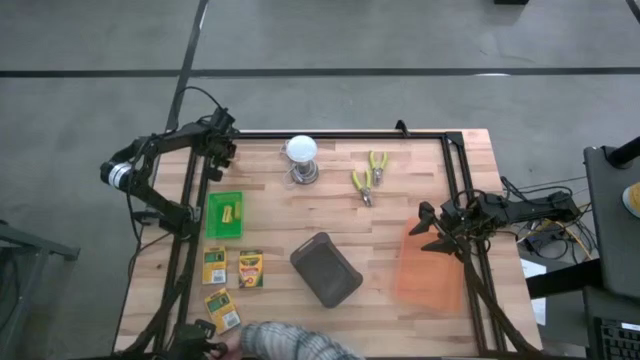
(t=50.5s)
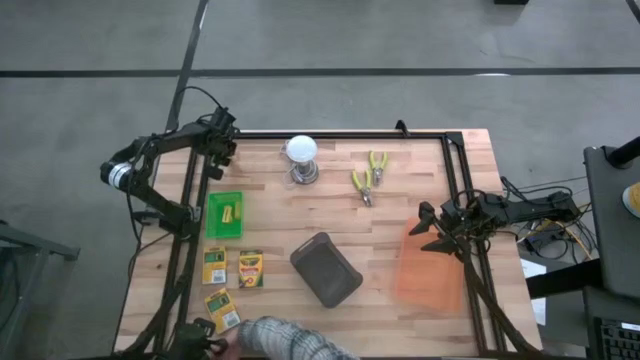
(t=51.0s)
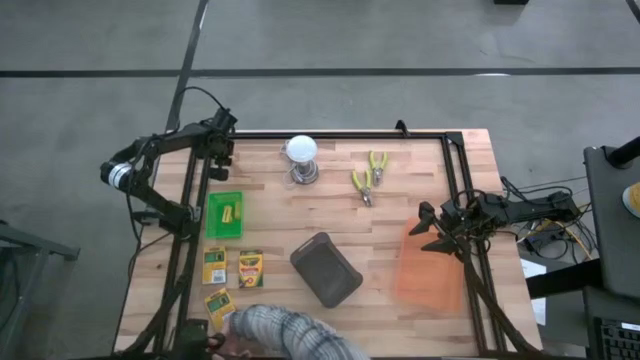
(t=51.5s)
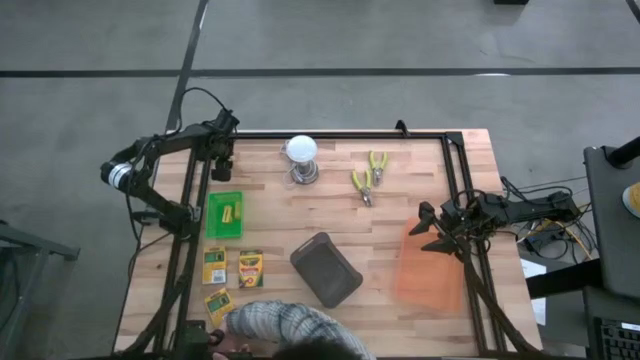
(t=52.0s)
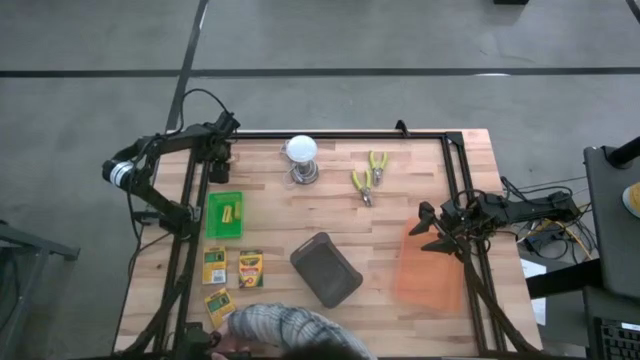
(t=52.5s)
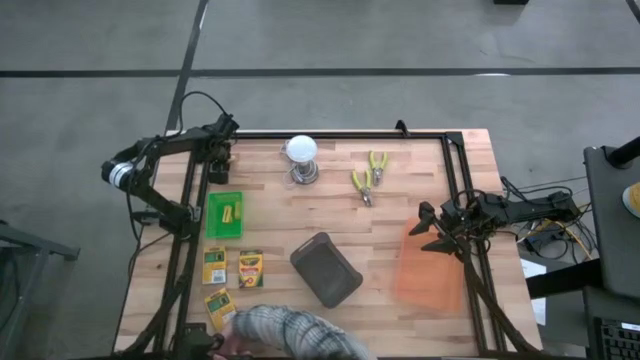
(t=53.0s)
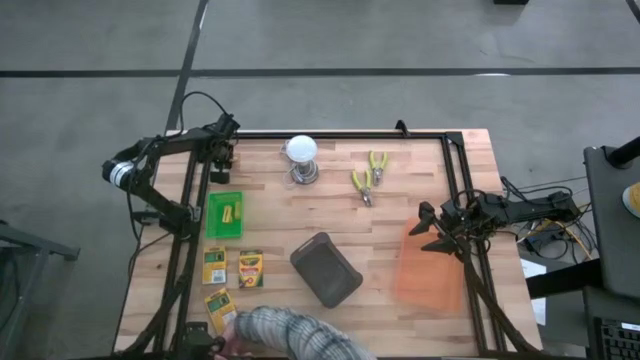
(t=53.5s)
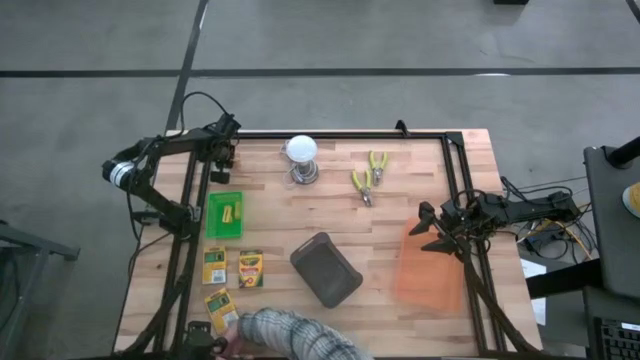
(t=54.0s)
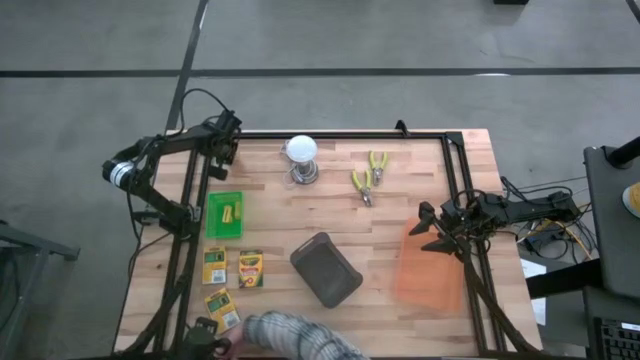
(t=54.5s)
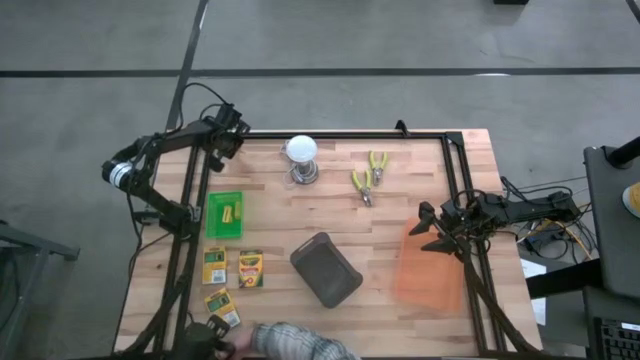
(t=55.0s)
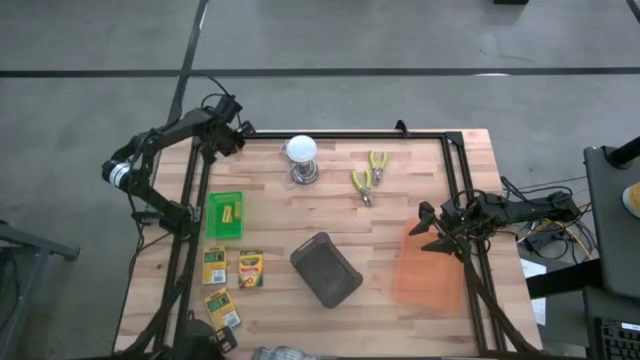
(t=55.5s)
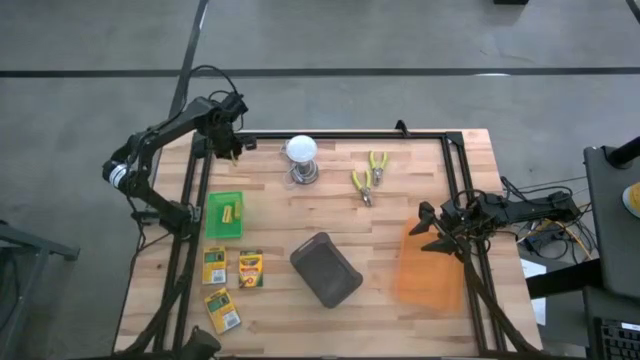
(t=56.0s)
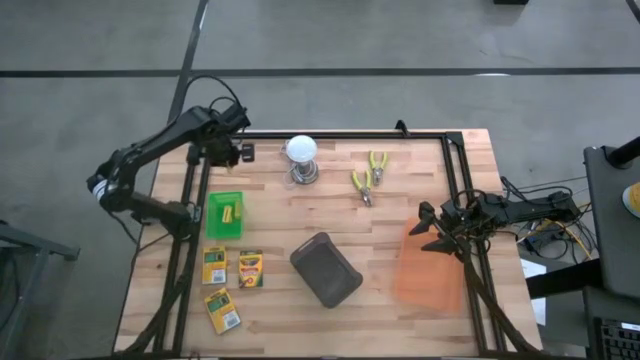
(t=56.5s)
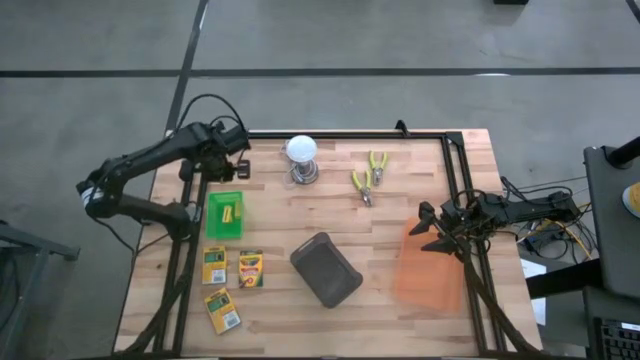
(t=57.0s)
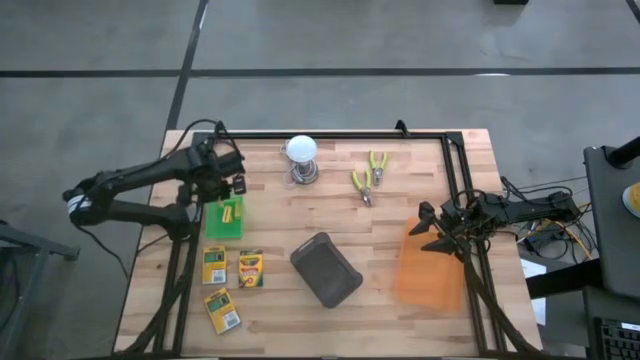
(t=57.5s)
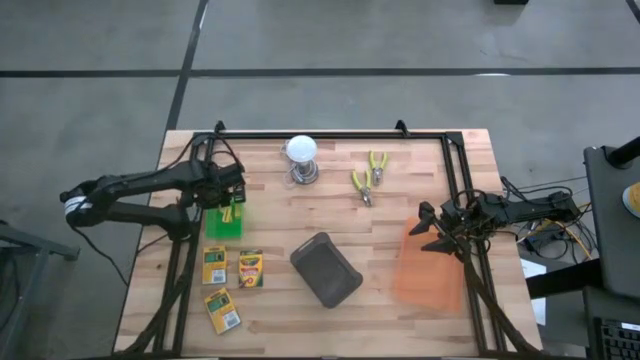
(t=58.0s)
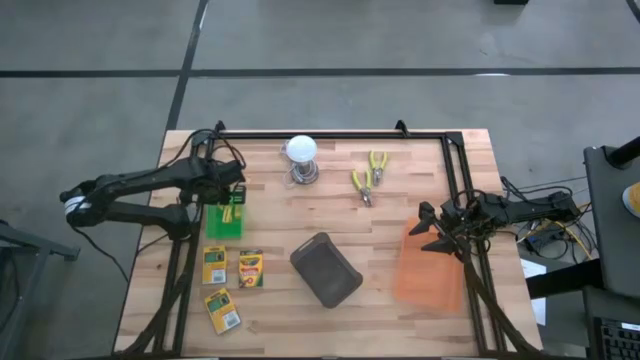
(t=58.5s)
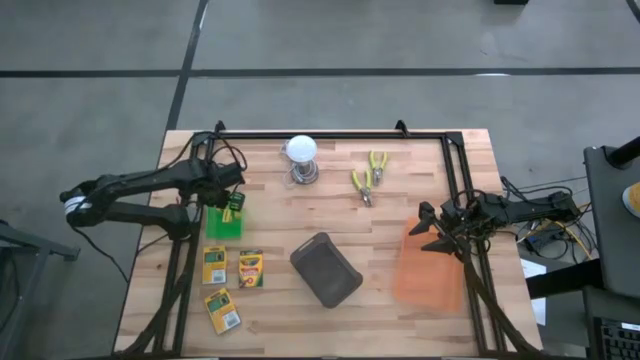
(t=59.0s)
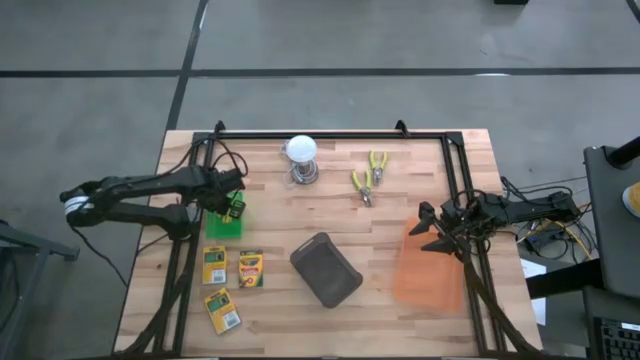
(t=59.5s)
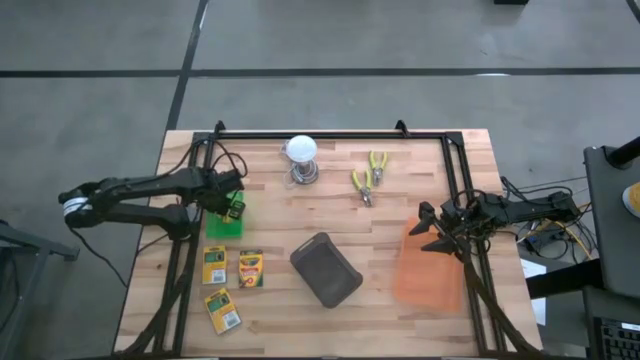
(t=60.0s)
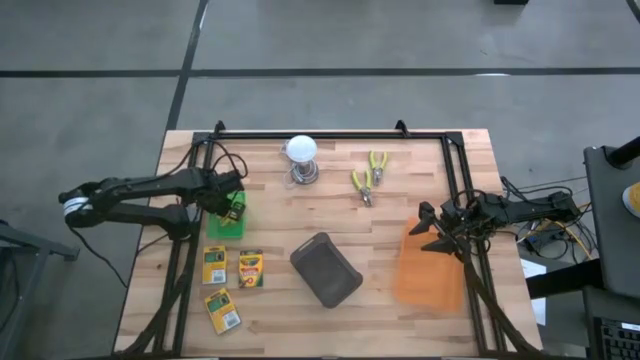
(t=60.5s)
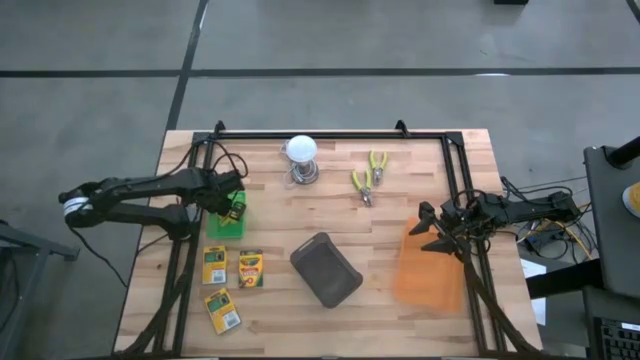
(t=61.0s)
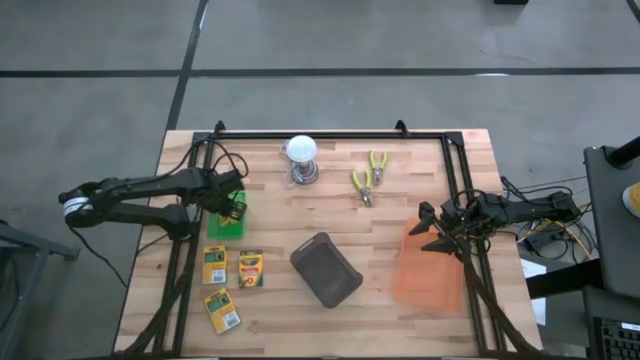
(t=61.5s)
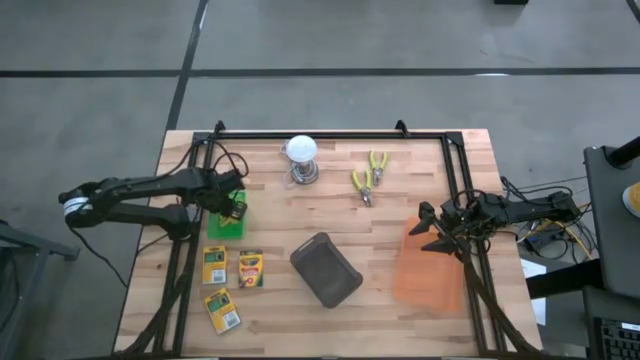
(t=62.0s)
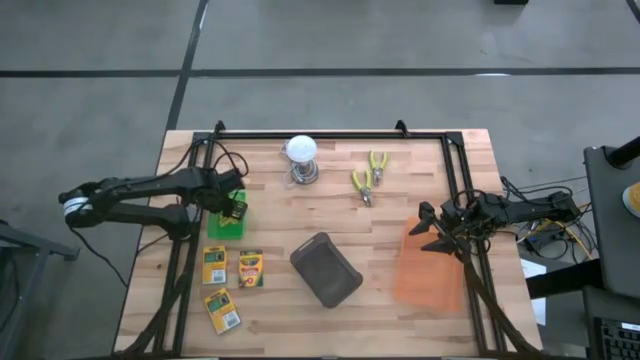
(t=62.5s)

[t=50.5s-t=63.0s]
Task: Pick & Place School Supplies
Put the yellow eraser into the green bin

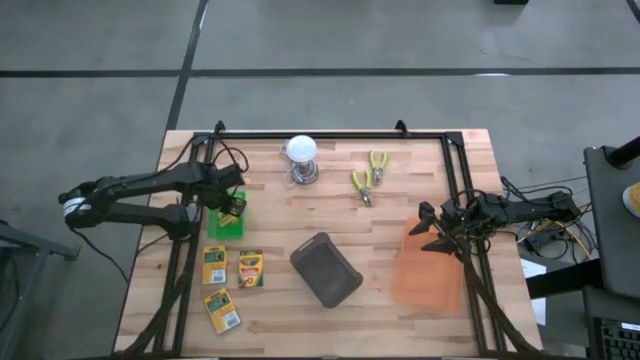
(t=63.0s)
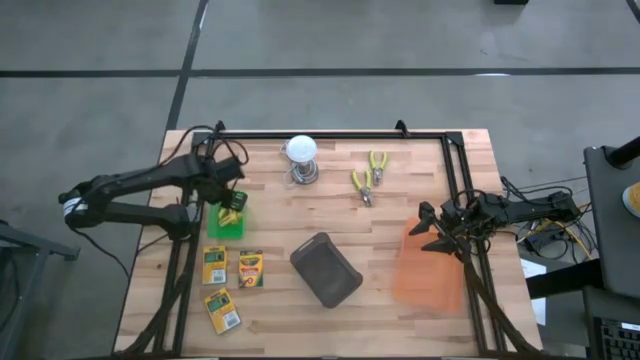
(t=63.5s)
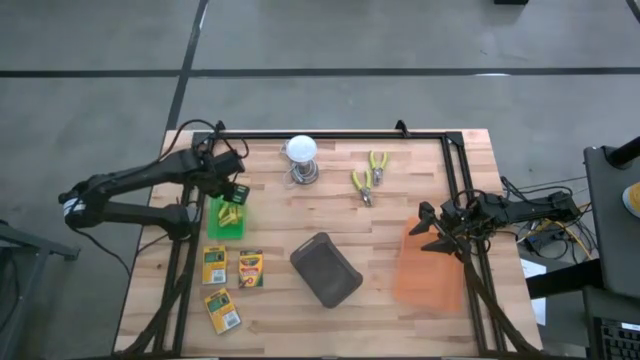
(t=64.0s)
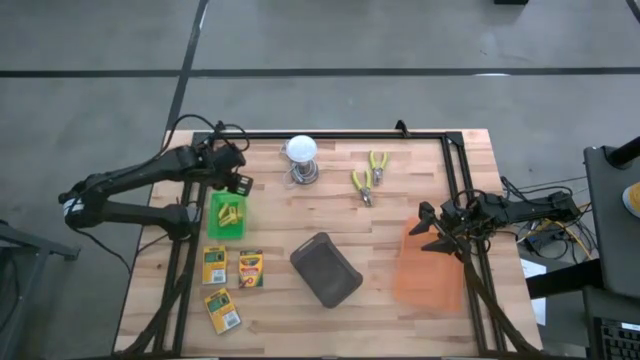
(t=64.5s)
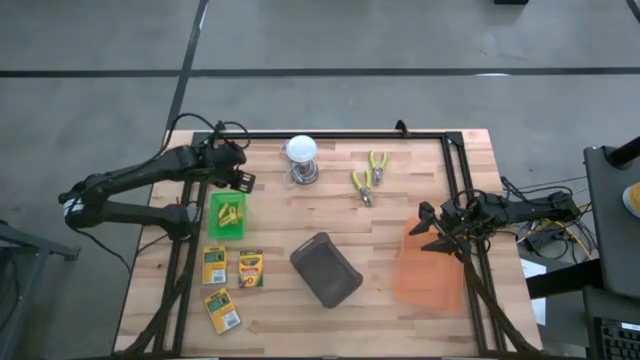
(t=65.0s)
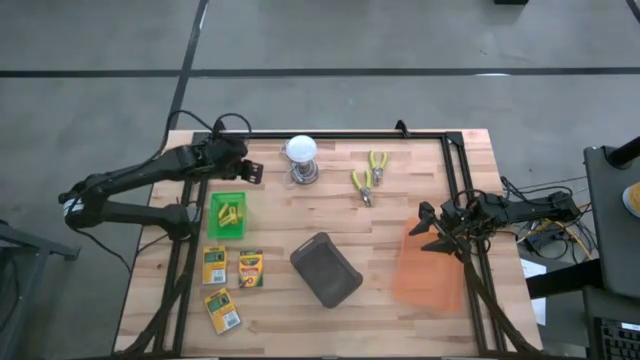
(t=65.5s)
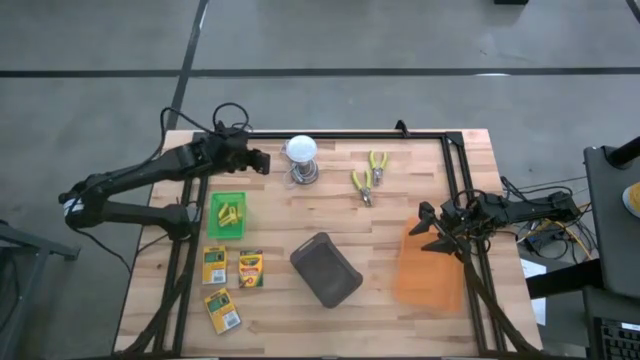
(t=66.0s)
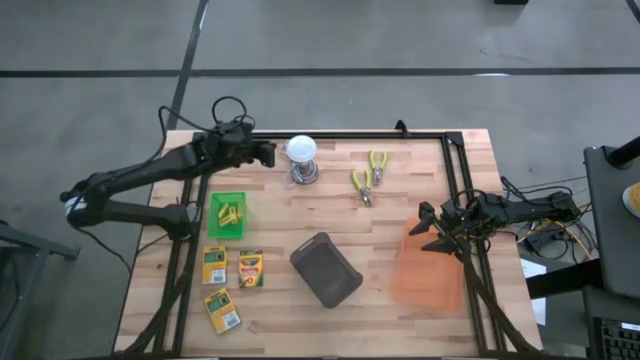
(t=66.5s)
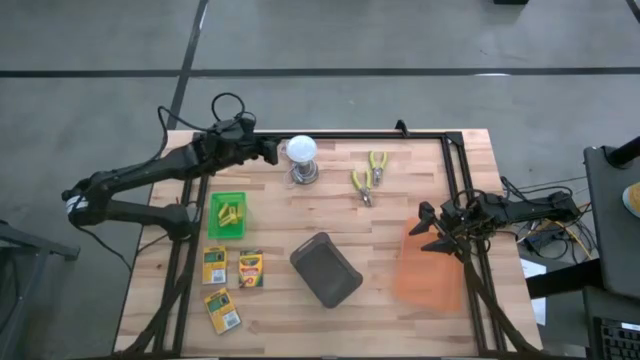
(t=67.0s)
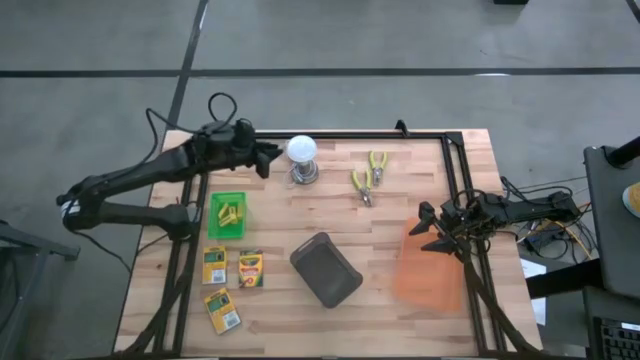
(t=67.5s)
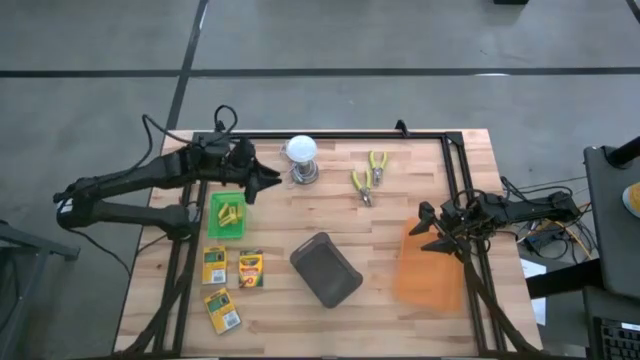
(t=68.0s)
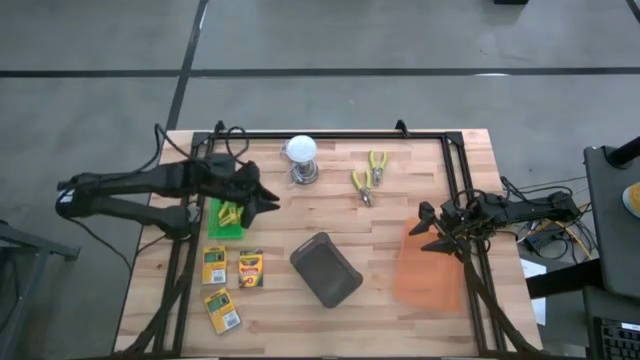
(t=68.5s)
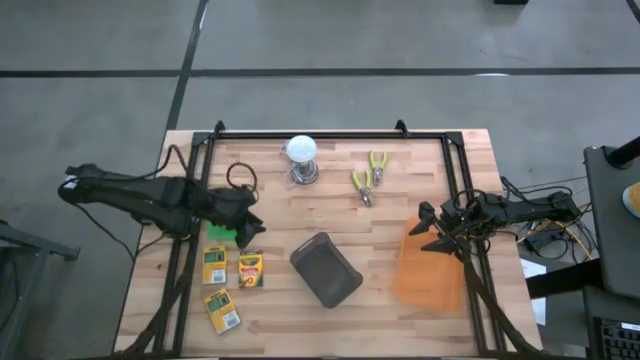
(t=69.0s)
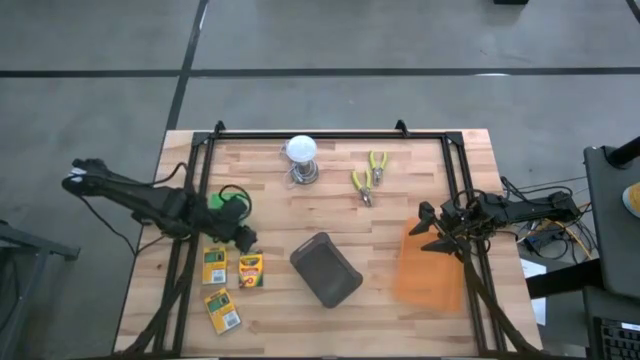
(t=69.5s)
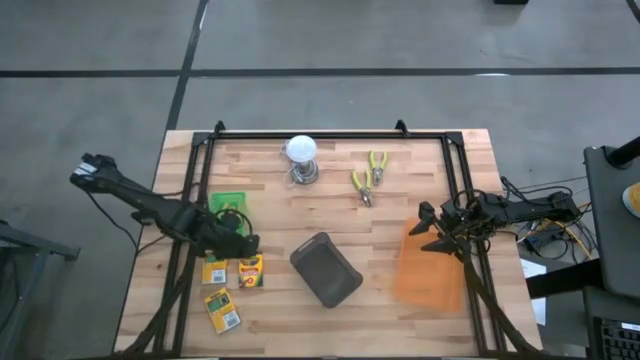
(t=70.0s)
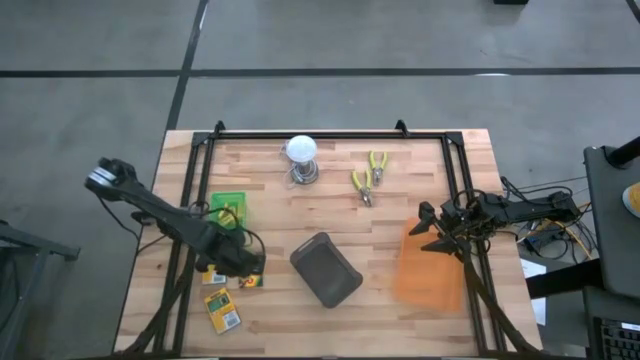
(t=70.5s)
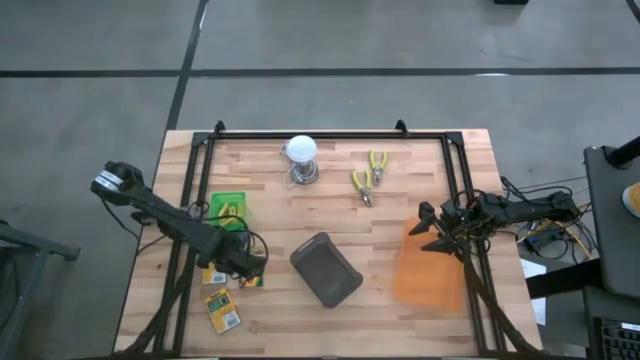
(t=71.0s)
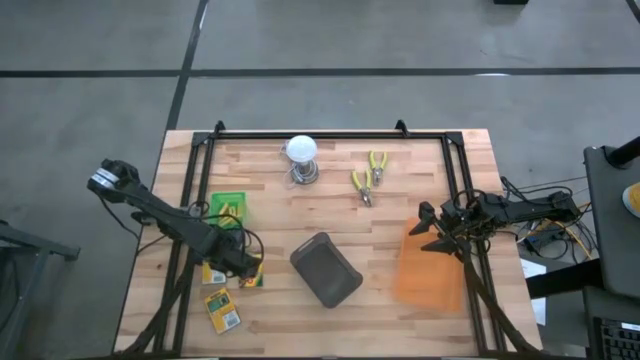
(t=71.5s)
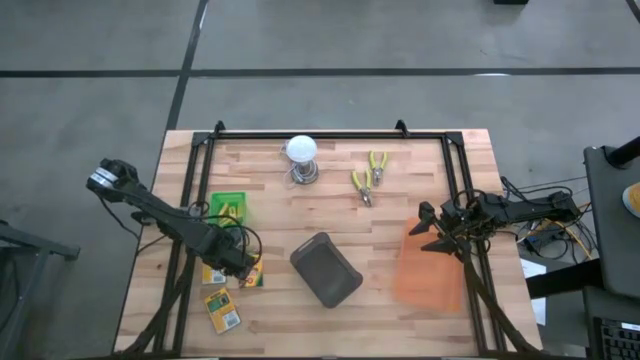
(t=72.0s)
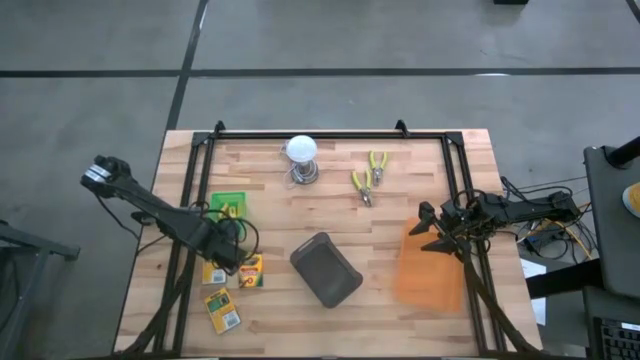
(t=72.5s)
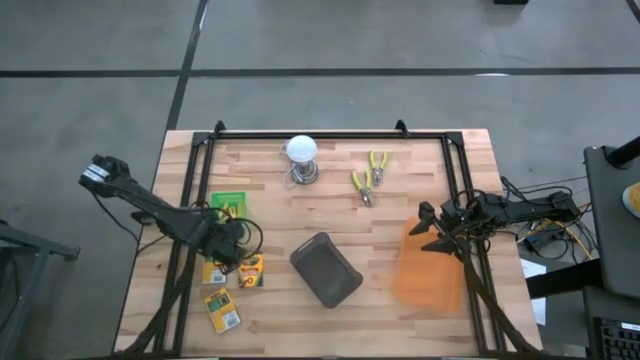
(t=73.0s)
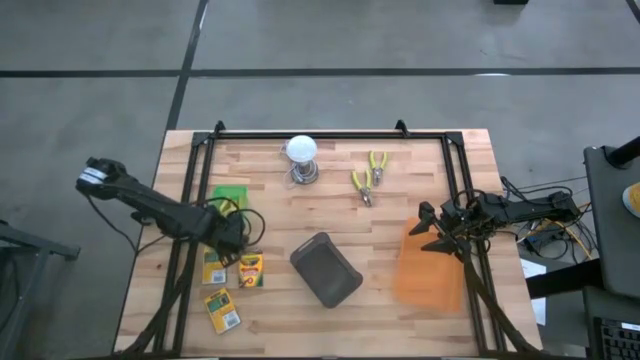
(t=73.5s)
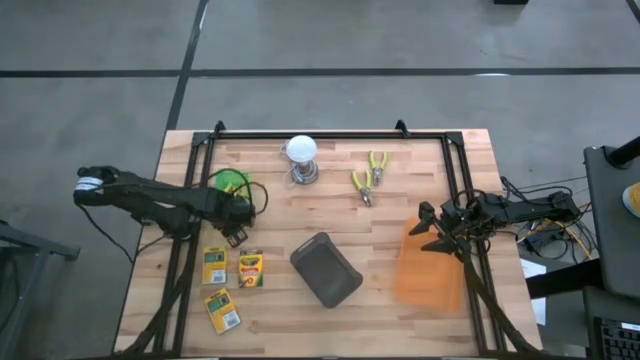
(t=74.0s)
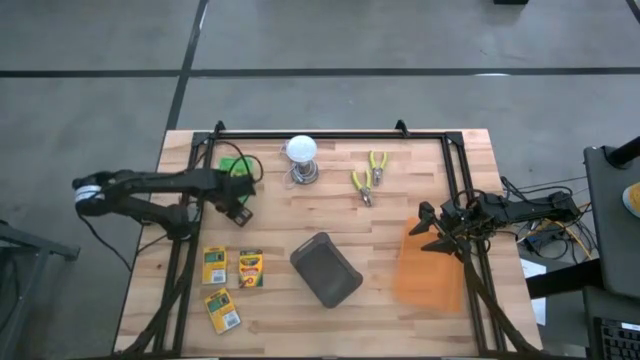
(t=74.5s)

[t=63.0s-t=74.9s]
Move the green bin to the top left of the table
